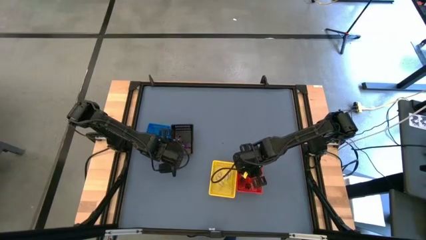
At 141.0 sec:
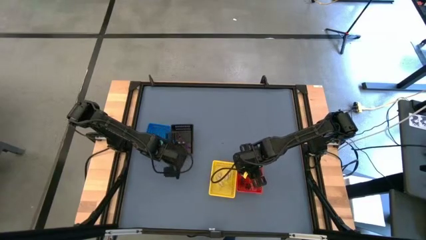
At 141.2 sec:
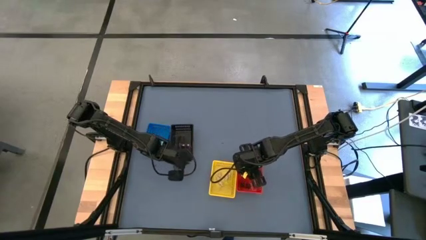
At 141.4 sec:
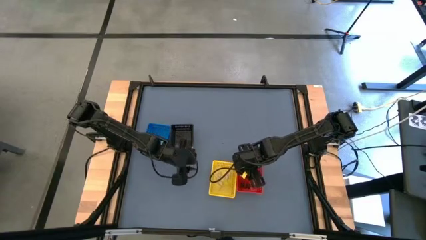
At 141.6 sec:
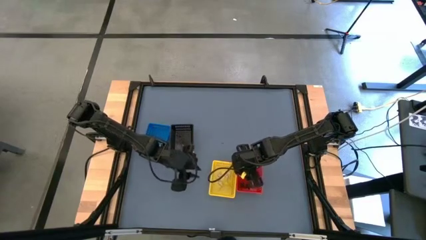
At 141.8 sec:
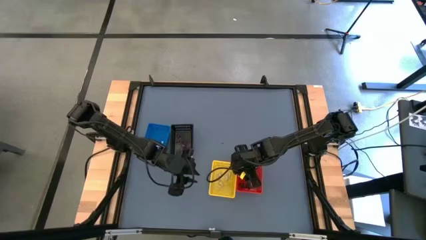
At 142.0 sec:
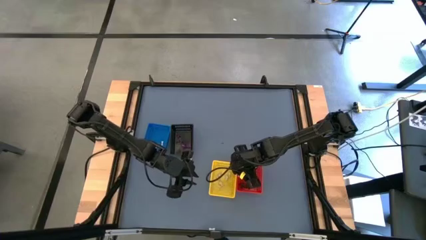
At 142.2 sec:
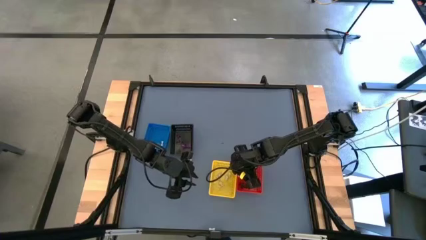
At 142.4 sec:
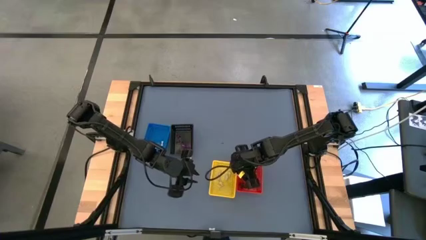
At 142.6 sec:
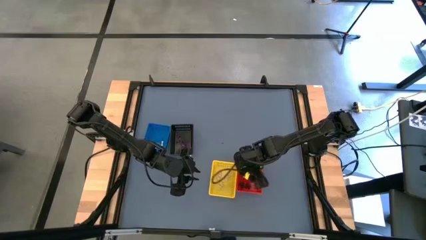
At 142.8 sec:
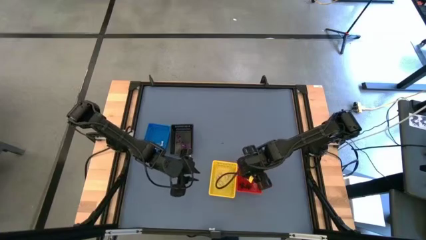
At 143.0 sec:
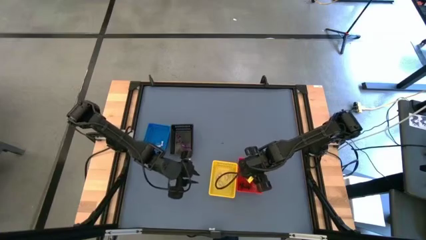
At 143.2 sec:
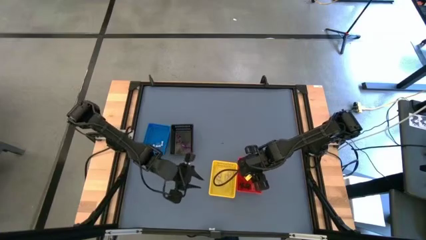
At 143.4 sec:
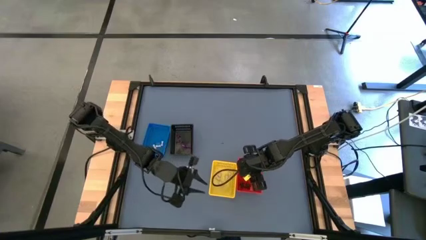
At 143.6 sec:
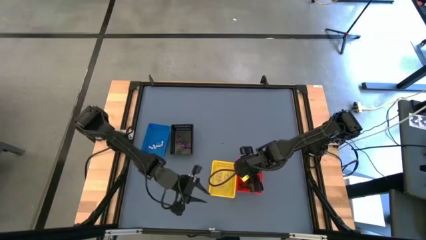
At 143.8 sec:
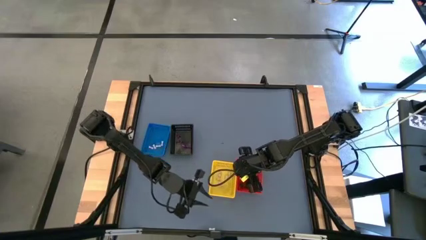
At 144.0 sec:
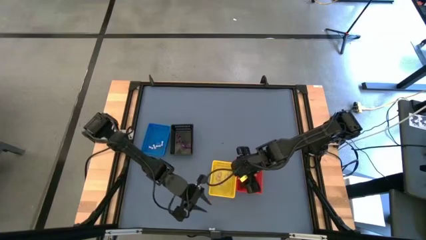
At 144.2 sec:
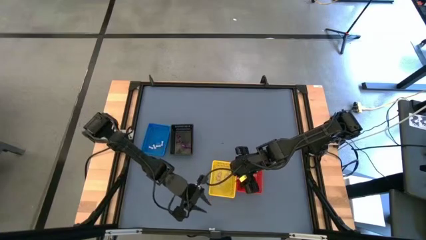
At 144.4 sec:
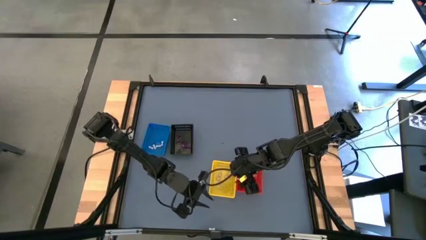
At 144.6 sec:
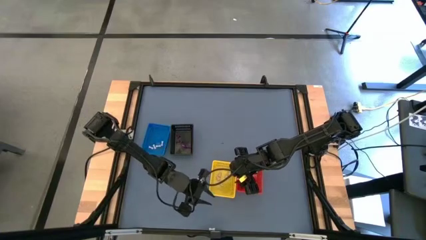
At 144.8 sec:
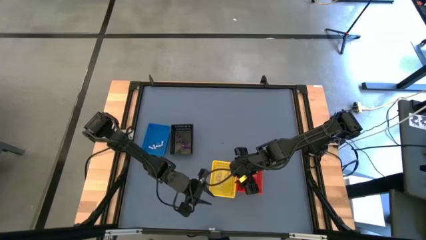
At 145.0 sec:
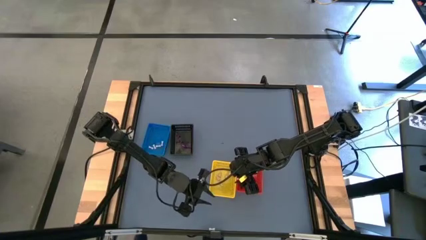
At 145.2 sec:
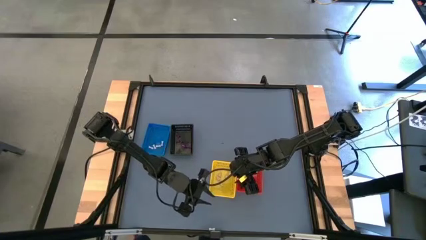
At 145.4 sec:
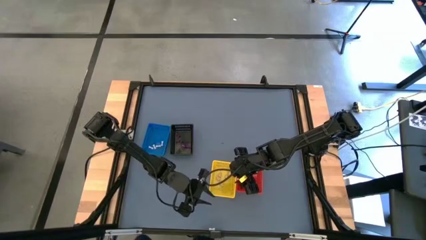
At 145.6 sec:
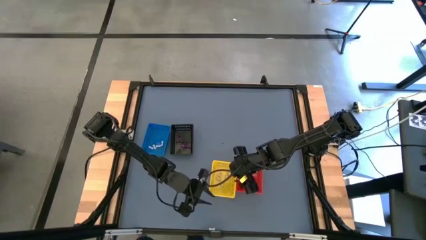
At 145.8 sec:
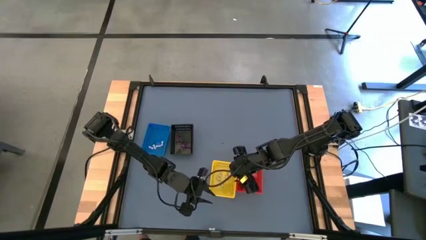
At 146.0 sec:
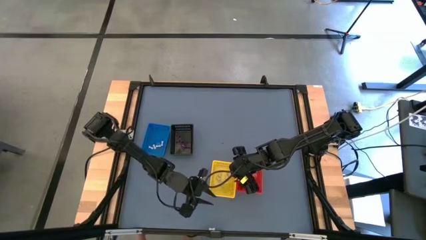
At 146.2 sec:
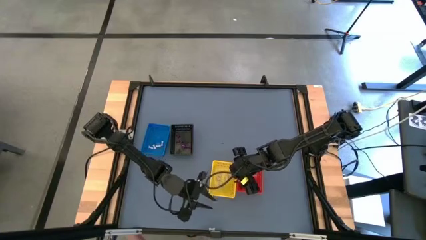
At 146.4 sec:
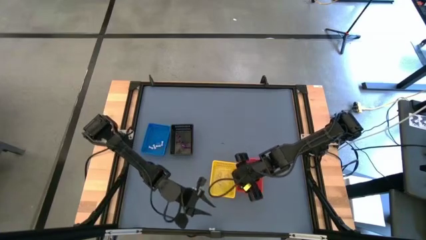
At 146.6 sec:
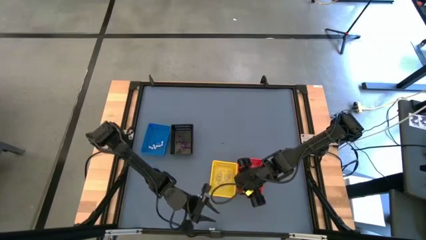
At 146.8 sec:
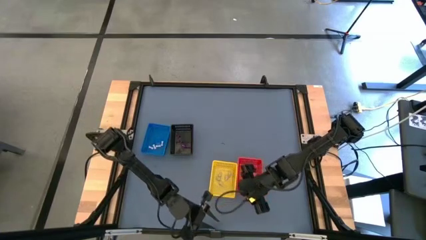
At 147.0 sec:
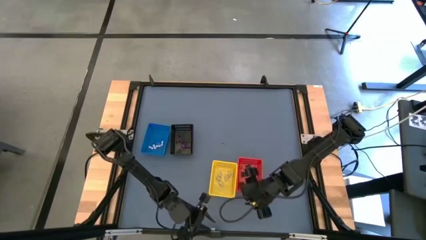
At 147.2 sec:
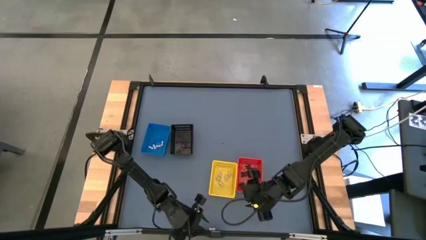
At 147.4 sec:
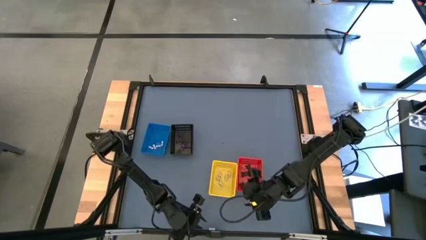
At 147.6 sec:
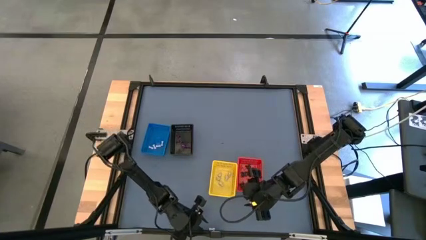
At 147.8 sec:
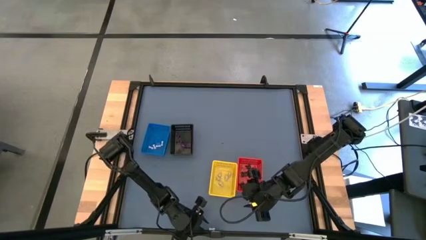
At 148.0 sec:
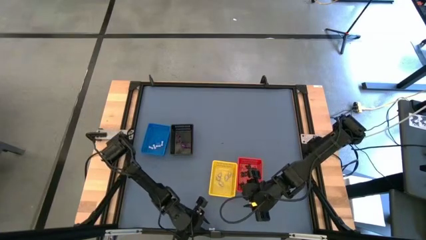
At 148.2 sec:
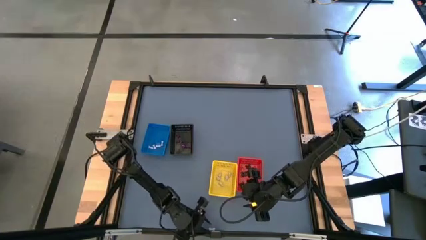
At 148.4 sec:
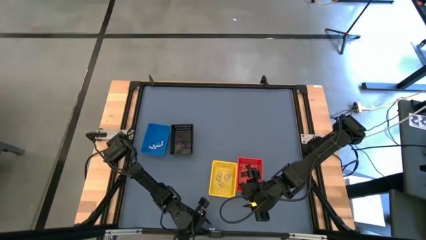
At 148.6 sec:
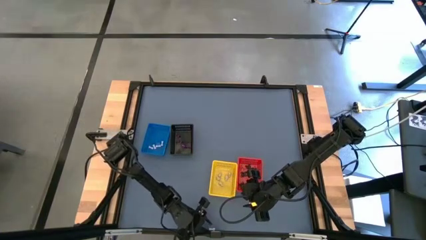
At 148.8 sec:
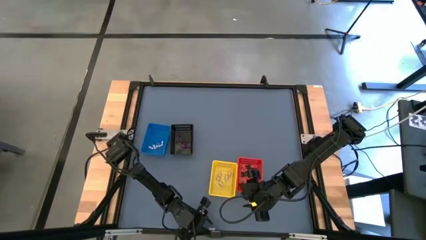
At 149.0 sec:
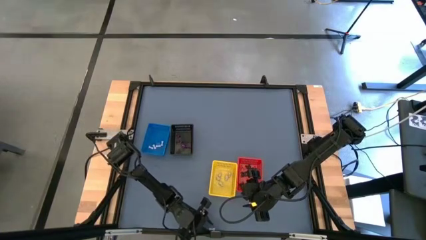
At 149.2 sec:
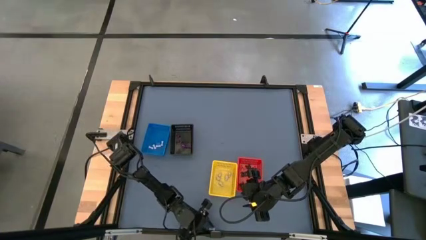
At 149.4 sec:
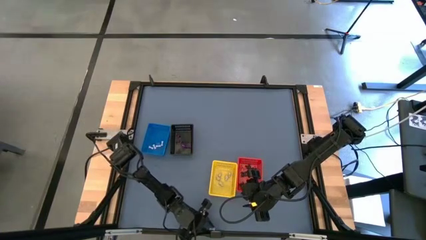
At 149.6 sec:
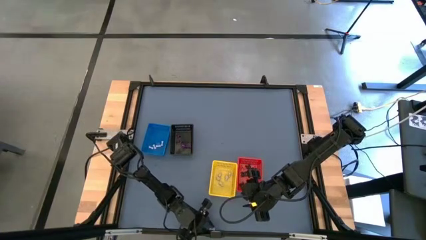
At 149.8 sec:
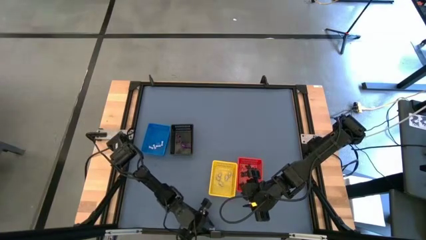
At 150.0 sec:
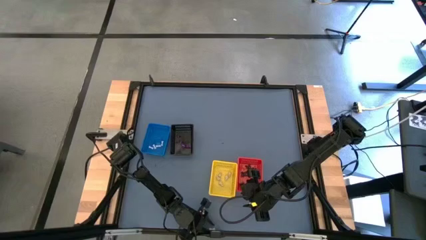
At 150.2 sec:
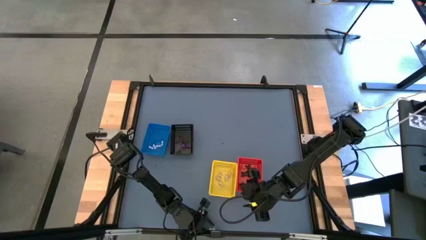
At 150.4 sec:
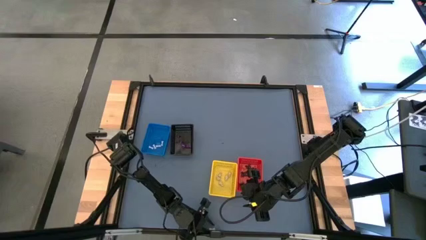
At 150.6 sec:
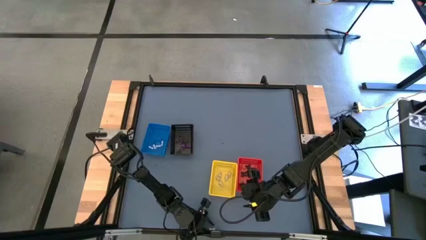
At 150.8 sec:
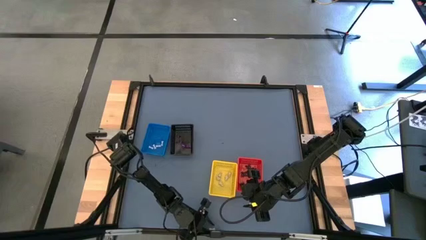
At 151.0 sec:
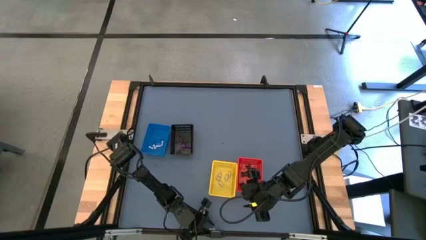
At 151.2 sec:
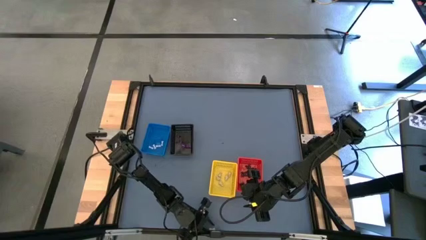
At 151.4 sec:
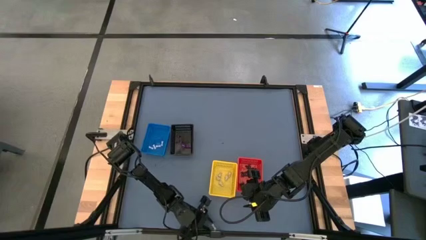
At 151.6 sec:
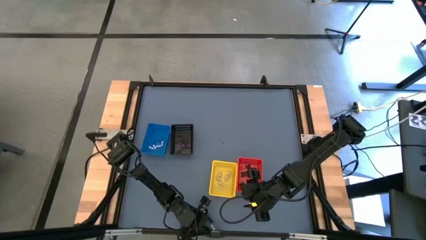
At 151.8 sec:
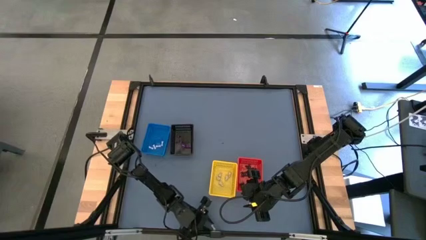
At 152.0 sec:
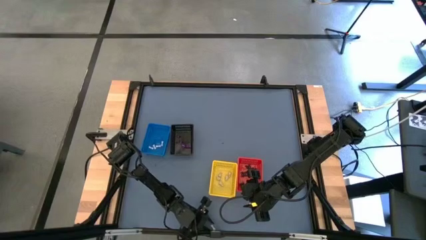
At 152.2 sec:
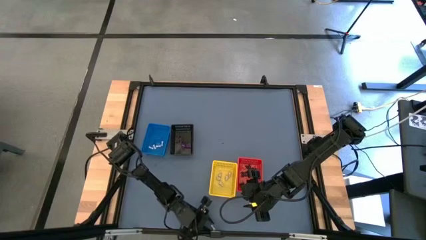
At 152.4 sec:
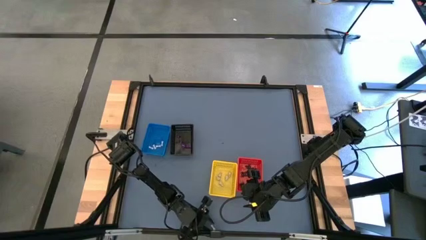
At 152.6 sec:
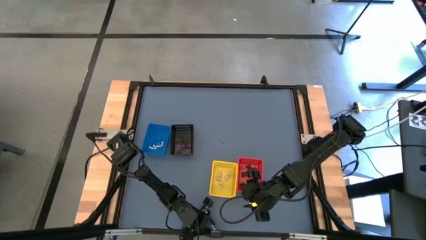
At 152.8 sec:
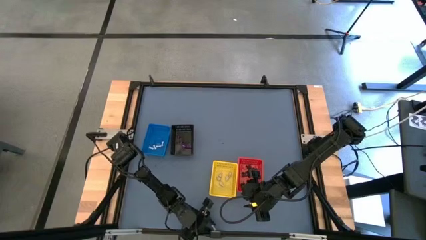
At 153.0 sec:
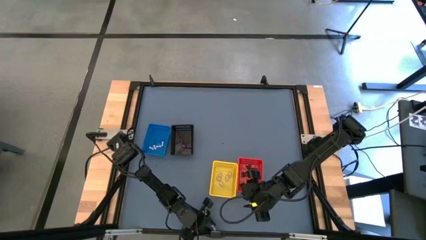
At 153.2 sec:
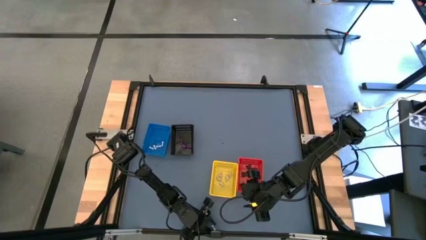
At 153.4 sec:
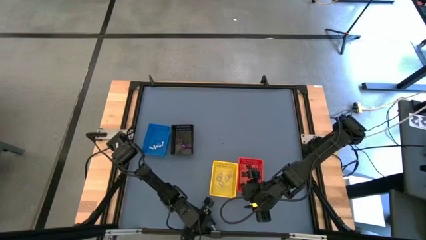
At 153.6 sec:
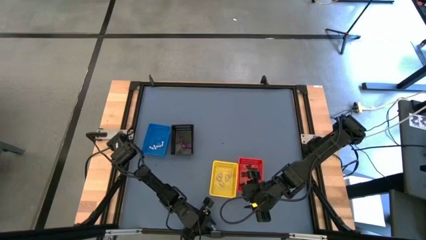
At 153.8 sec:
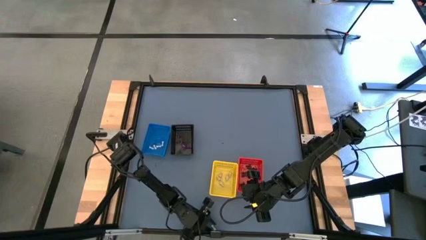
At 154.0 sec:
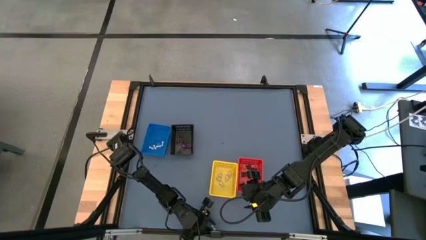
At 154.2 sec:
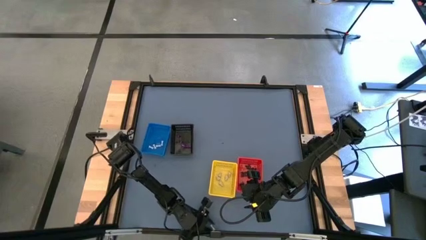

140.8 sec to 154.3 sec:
Task: Sort Halloween decoration
Put the bone toy into the blue bin
